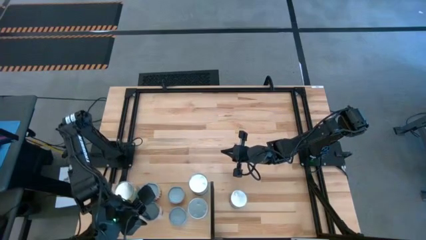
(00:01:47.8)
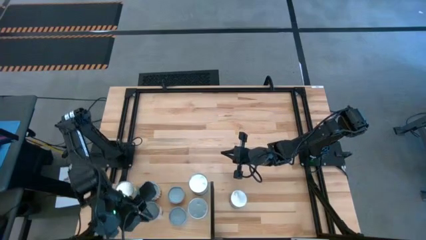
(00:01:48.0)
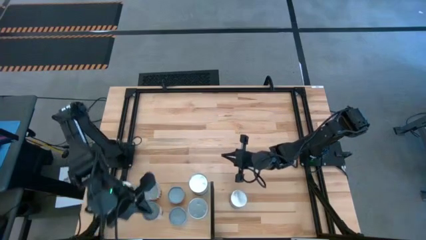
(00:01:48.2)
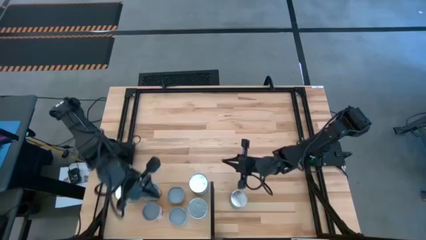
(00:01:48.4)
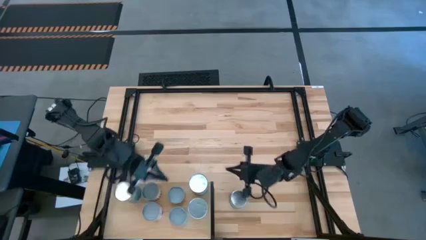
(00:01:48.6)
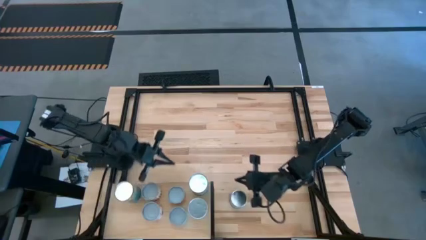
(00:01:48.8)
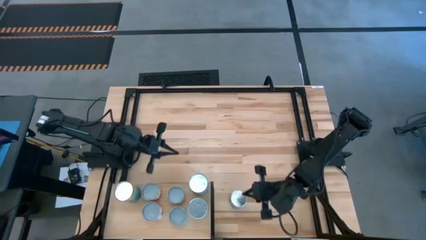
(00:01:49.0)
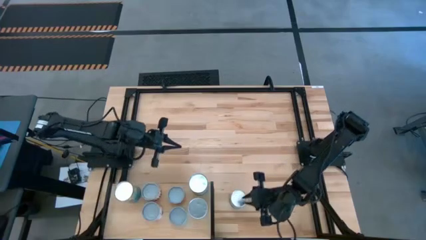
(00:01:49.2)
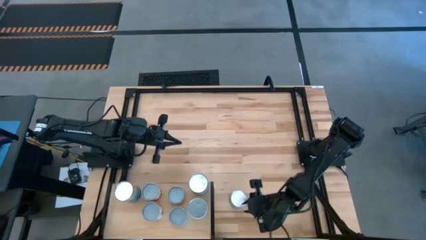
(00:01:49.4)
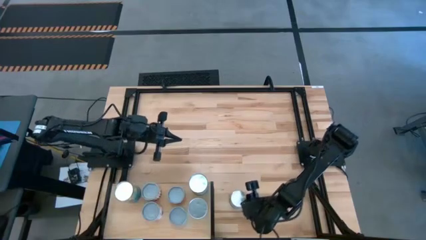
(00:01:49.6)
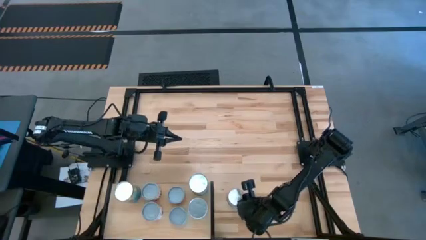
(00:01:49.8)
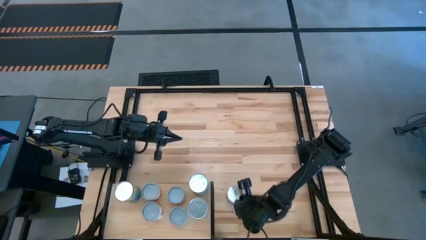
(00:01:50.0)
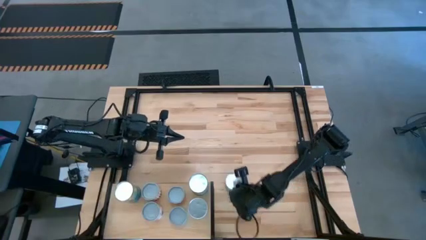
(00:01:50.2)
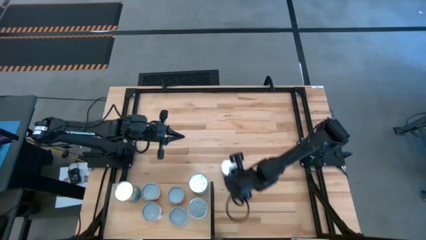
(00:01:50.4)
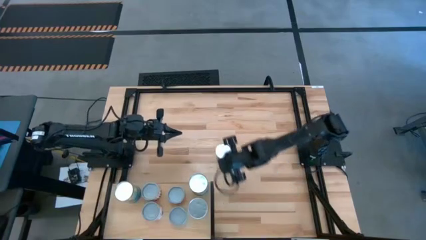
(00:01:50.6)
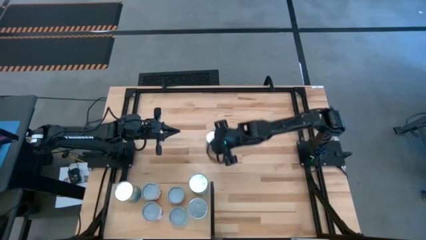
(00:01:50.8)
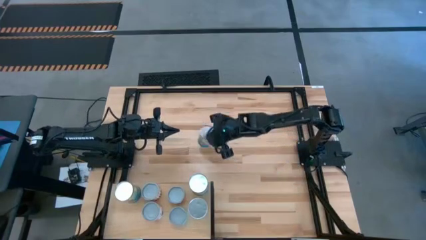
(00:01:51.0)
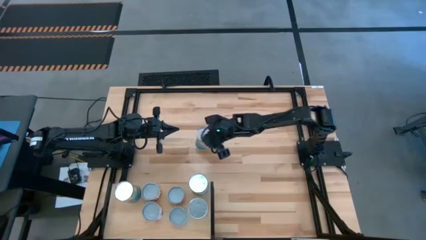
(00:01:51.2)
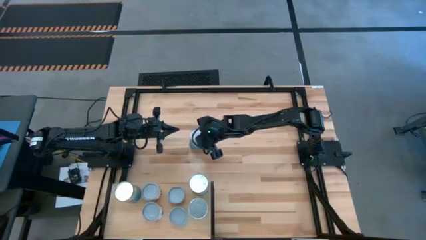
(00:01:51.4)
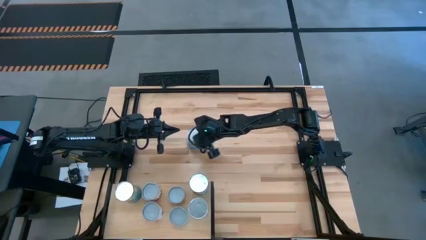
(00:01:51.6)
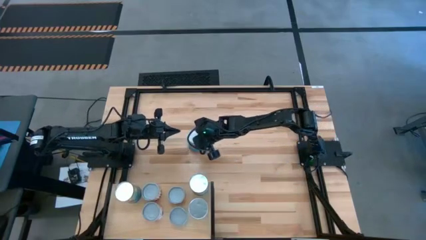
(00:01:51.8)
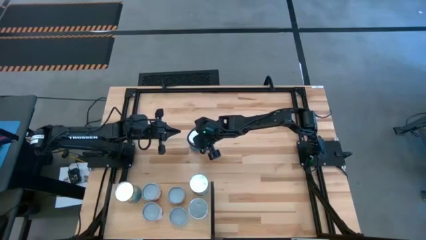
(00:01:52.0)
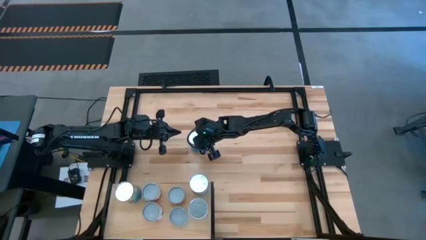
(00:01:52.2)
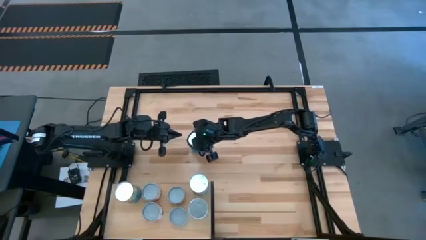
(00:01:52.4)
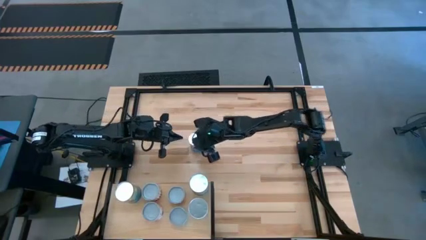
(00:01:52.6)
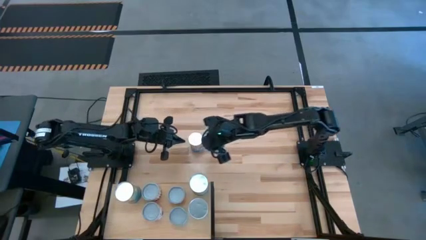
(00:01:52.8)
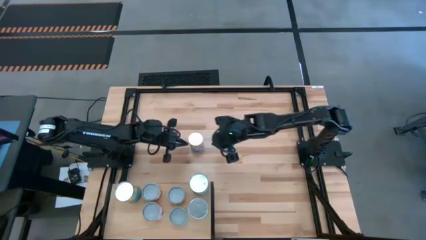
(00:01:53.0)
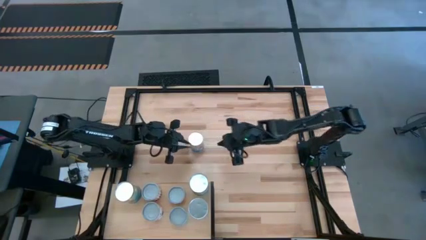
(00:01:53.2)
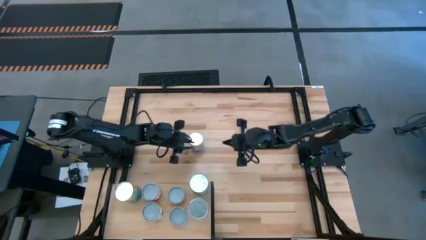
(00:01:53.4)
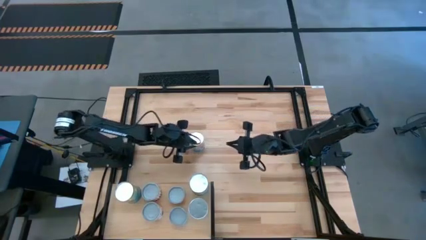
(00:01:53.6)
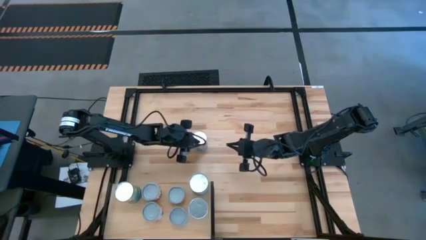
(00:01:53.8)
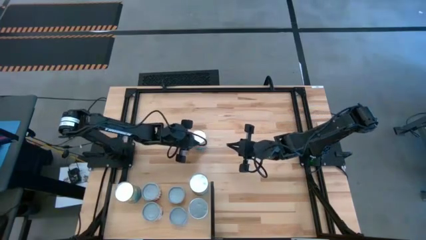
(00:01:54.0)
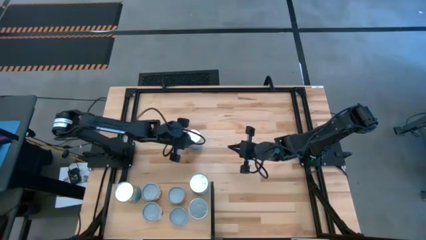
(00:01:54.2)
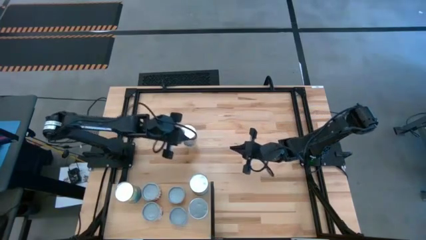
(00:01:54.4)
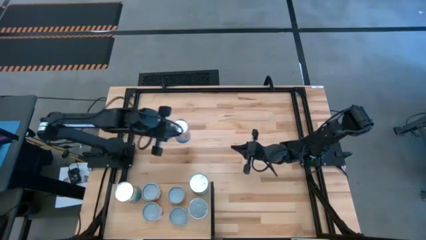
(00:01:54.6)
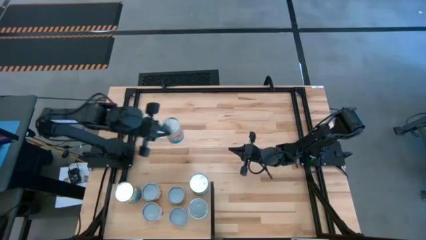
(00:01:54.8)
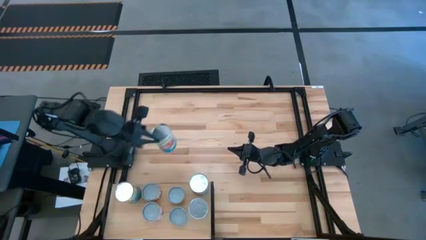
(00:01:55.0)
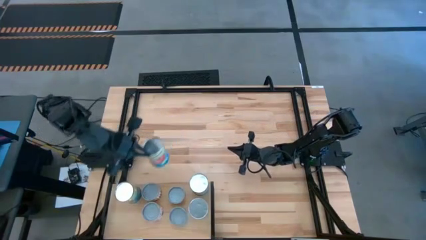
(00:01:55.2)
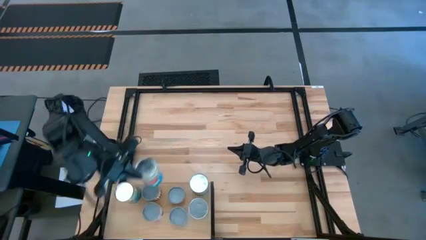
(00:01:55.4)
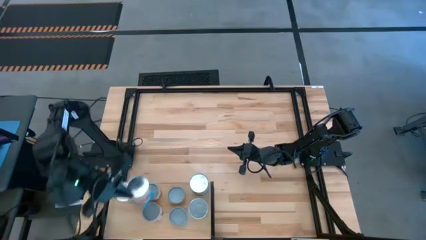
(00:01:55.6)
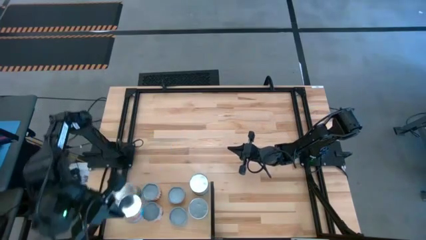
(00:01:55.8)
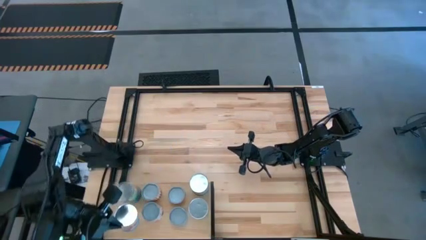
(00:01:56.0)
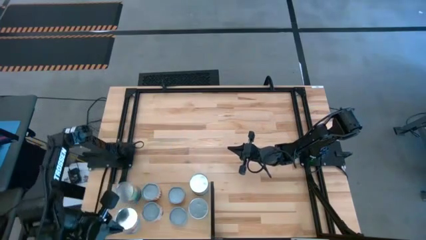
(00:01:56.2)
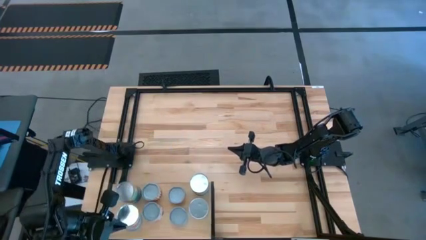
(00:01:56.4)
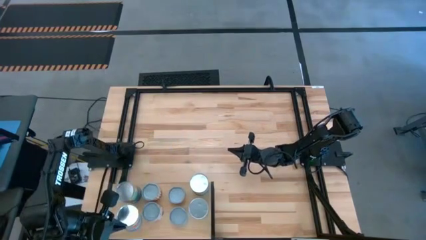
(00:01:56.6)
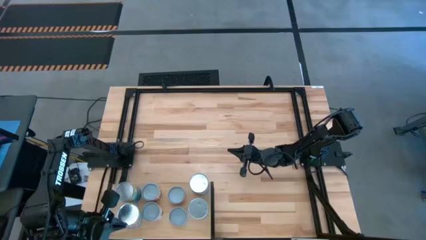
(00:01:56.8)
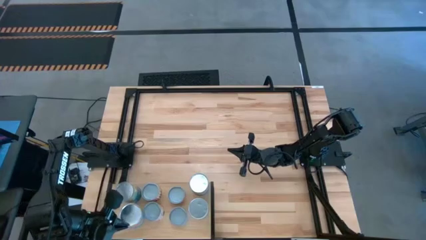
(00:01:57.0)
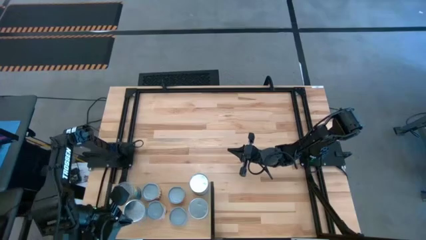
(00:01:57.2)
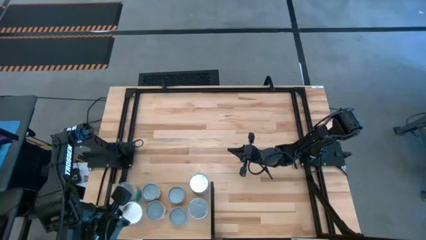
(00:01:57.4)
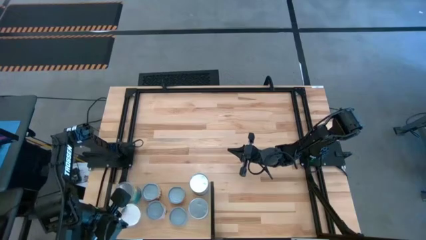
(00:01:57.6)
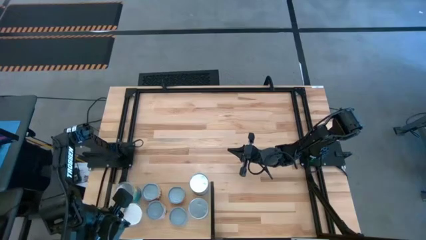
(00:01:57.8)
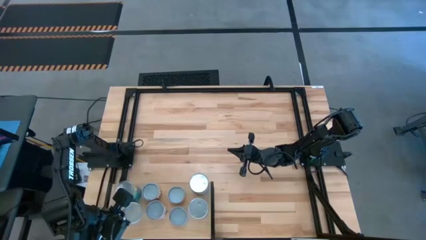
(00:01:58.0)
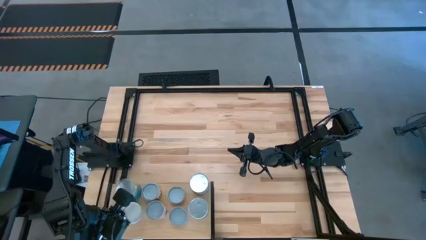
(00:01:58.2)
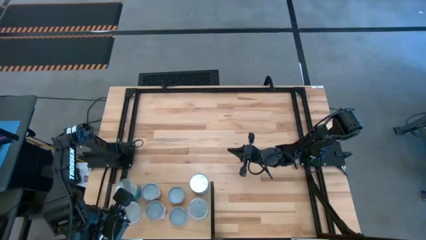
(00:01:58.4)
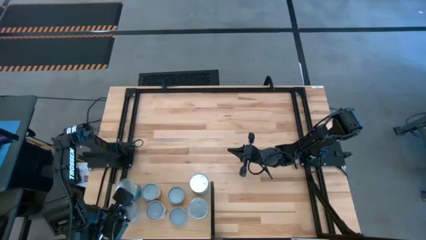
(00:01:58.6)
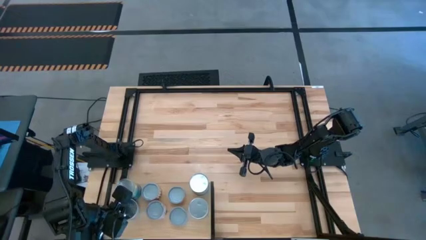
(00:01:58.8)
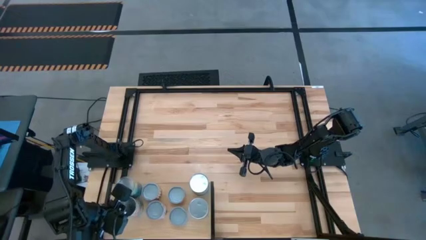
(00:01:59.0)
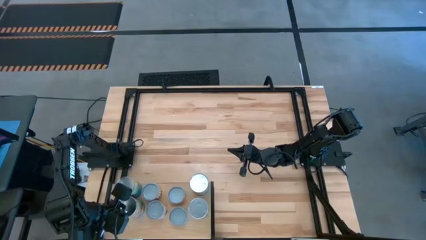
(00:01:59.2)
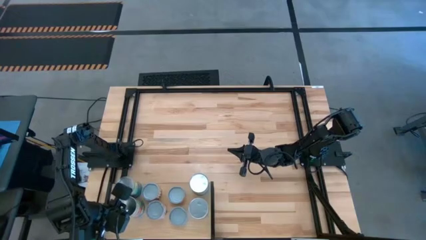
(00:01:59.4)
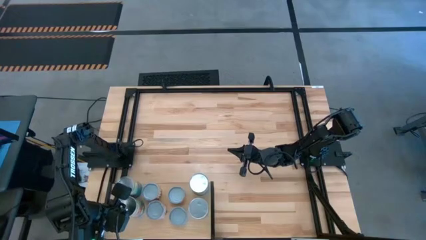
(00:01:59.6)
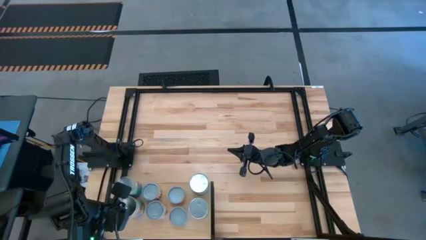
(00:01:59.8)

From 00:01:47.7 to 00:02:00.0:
Task: Pick and place cans onto a shelf
Put the canned tomatoes on the shelf

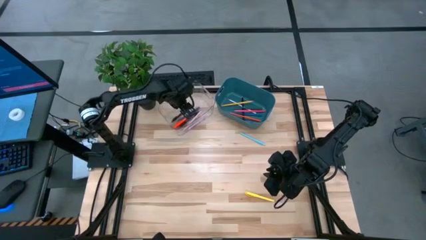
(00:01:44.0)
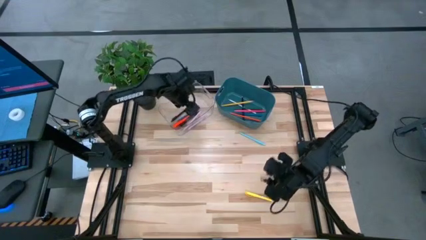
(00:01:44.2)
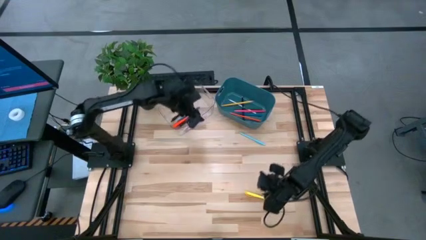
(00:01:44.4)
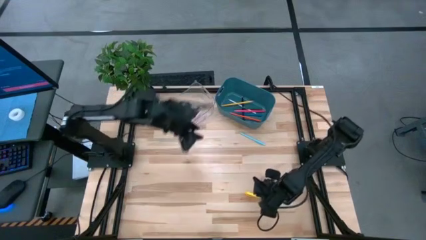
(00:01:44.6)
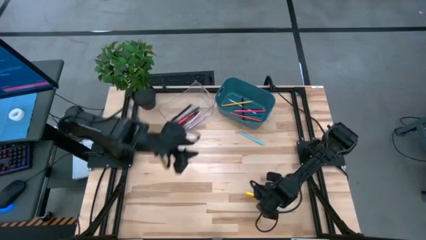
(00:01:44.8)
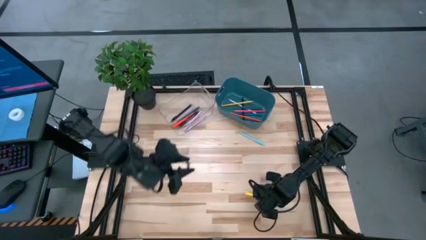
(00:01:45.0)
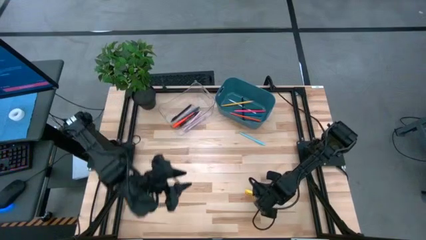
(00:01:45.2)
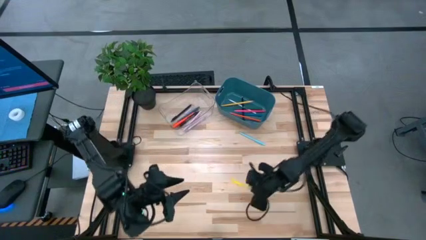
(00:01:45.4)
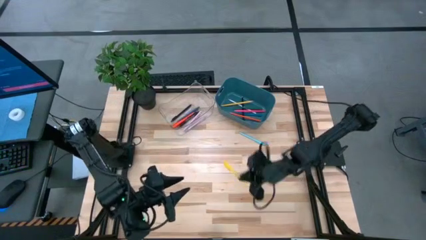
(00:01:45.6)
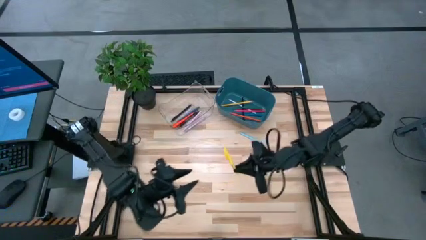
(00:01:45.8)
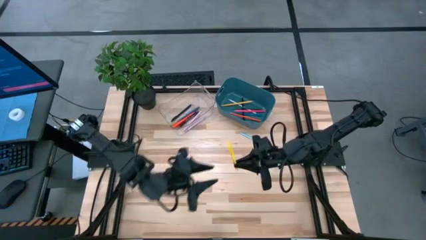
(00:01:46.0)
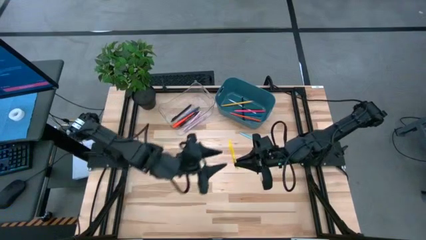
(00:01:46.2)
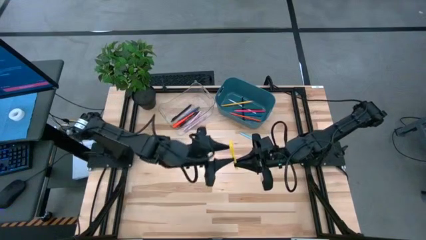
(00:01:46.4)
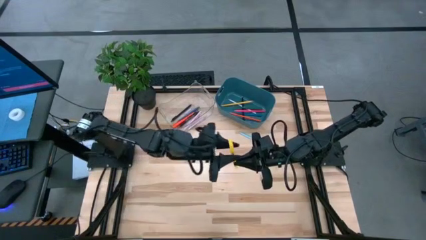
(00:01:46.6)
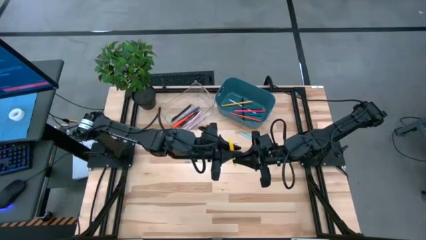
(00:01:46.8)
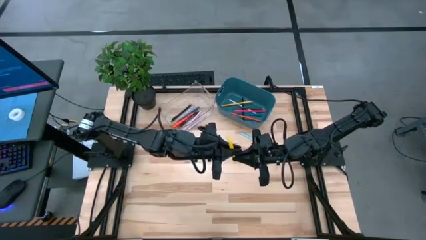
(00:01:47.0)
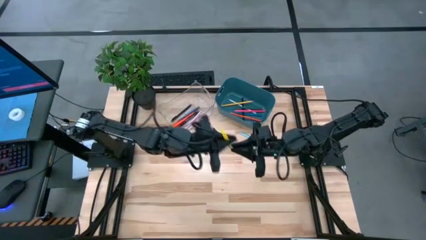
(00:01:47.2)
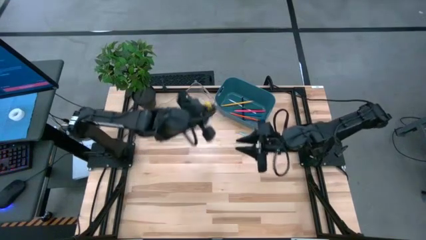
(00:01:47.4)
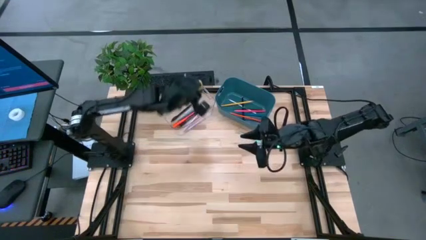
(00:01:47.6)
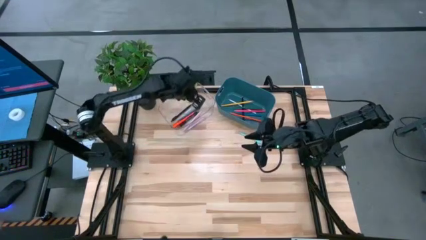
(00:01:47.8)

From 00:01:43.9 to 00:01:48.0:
Task: Sort pens & pencils
Put the yellow pen into the transparent bin
